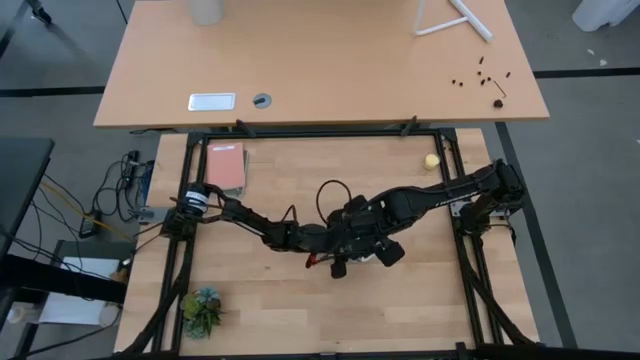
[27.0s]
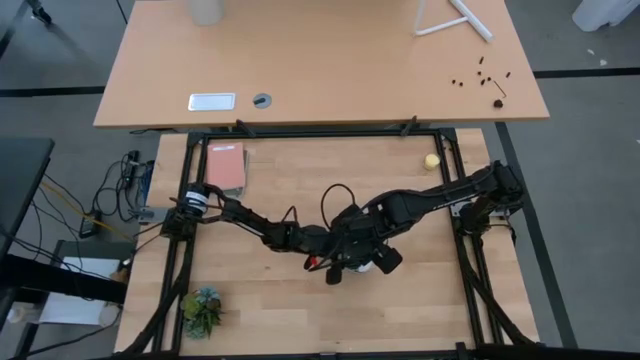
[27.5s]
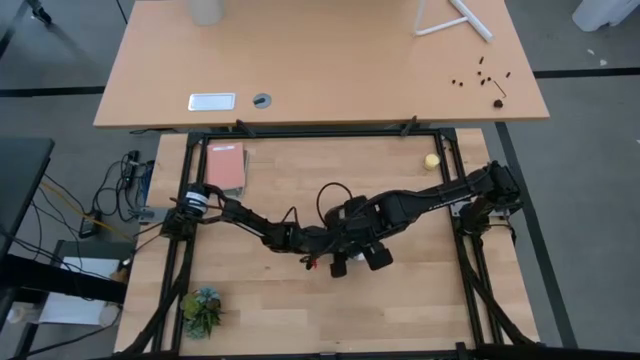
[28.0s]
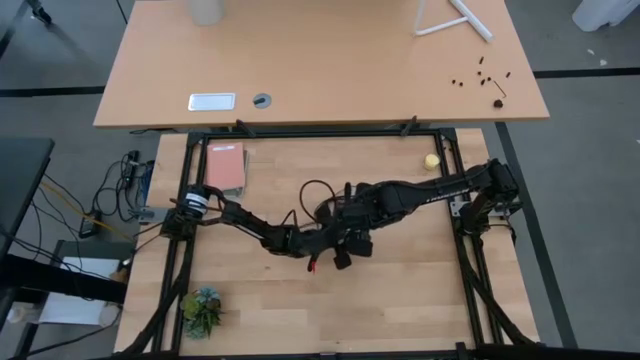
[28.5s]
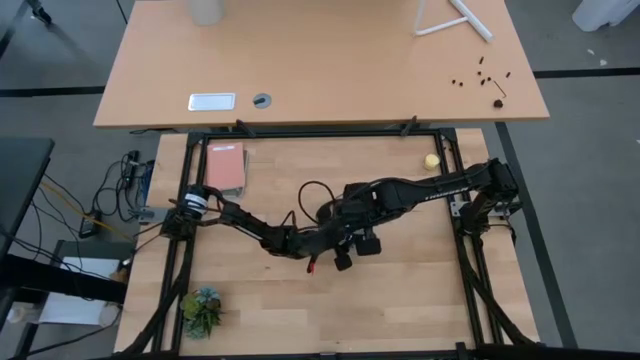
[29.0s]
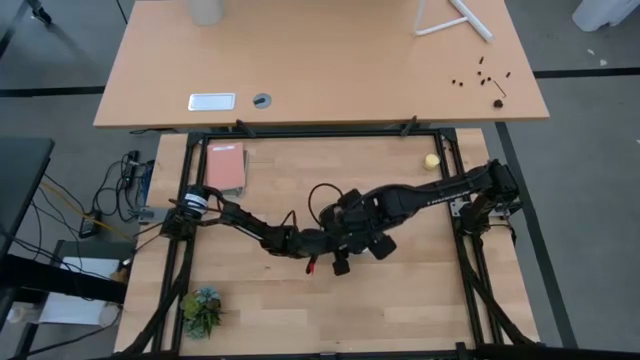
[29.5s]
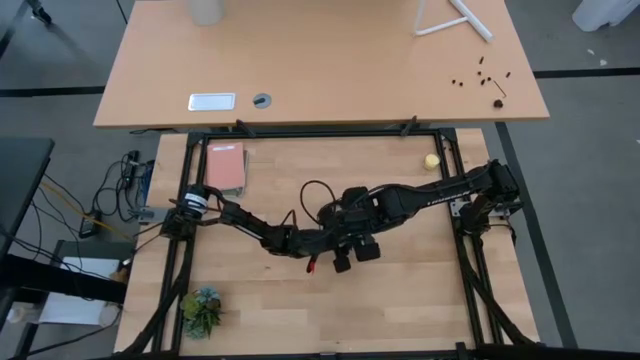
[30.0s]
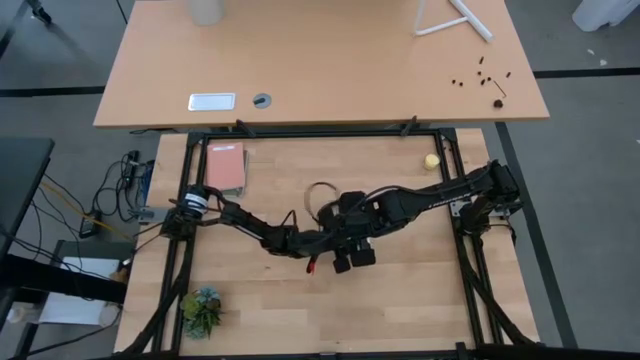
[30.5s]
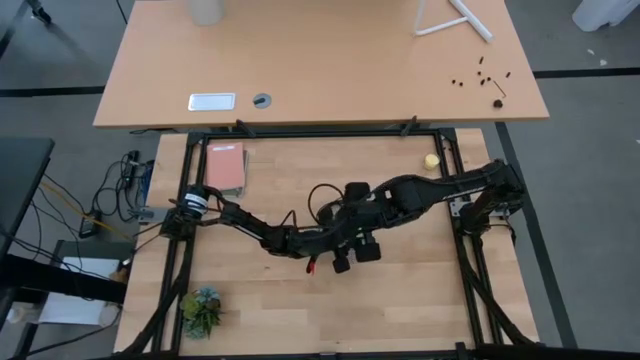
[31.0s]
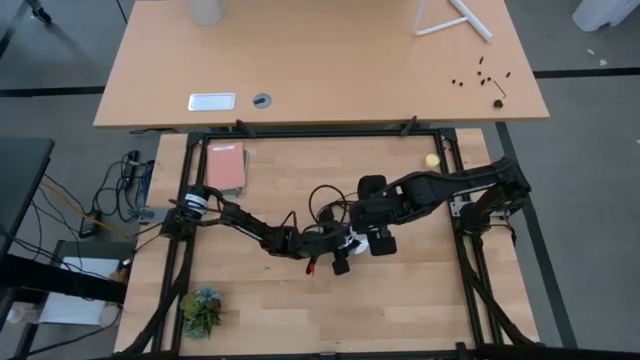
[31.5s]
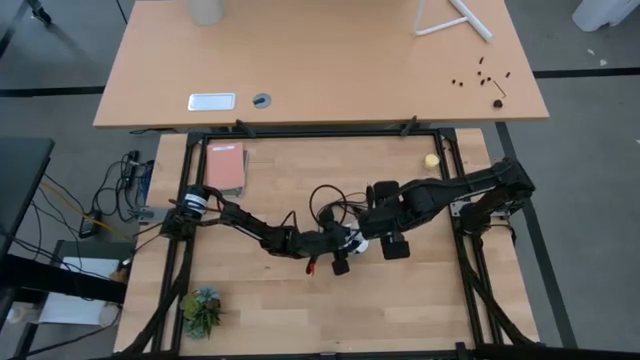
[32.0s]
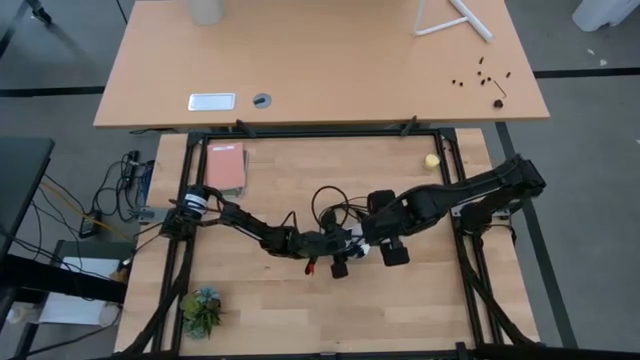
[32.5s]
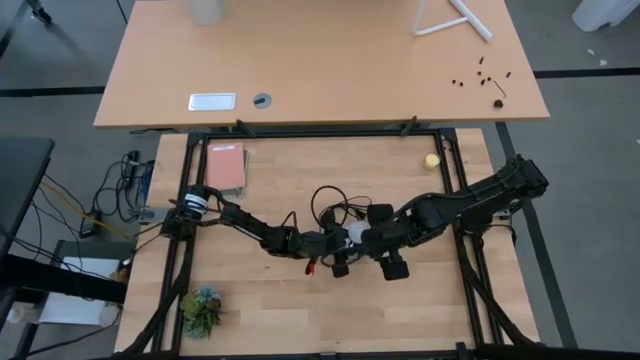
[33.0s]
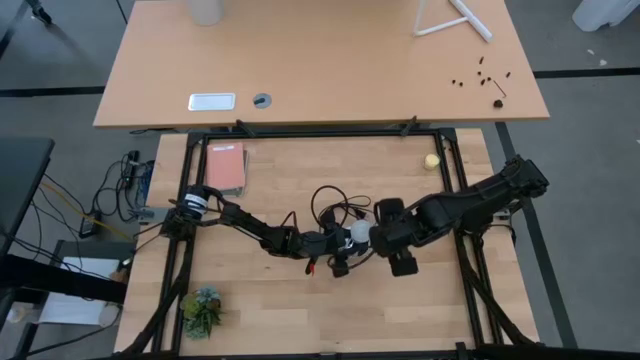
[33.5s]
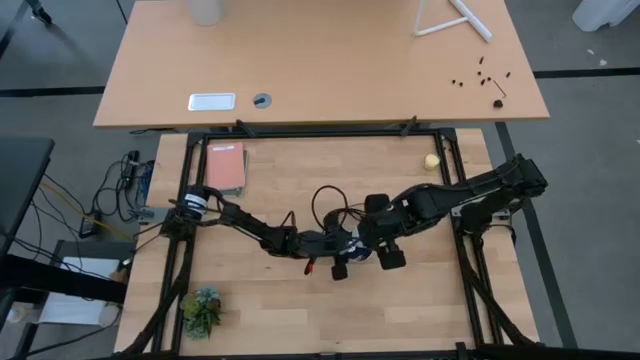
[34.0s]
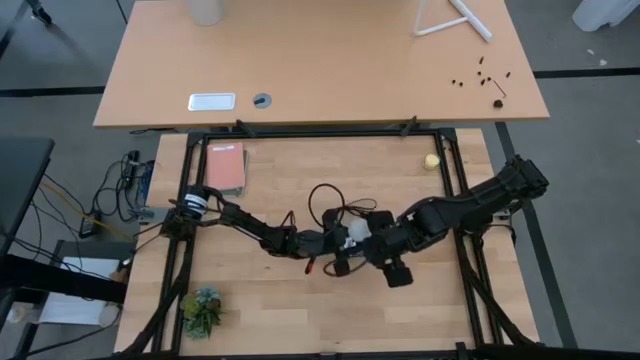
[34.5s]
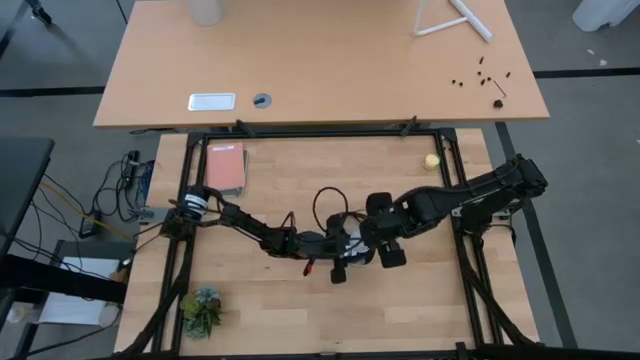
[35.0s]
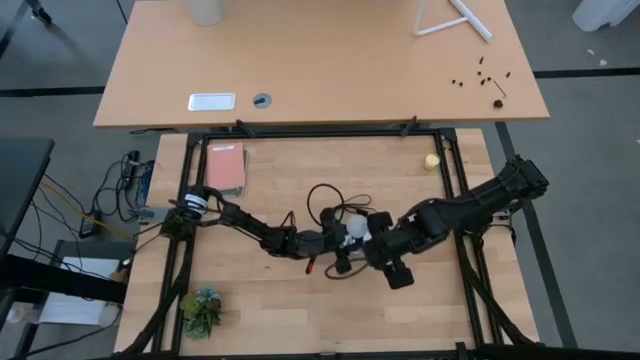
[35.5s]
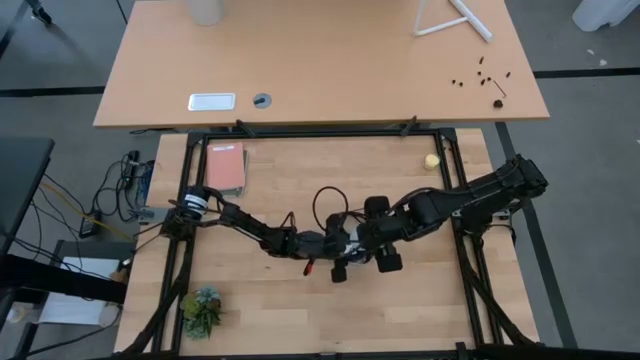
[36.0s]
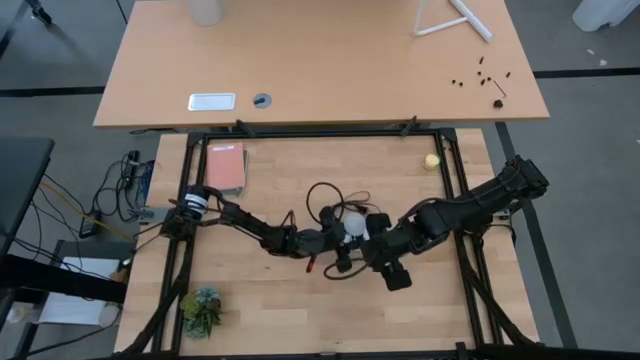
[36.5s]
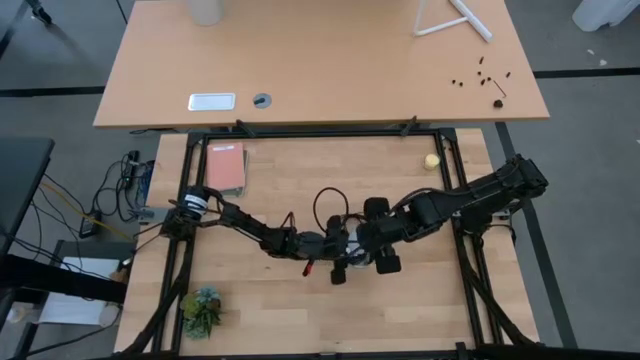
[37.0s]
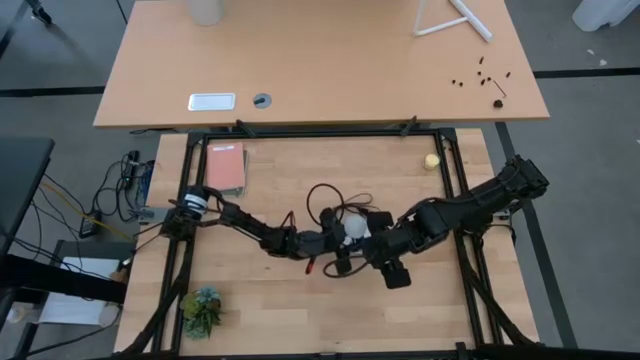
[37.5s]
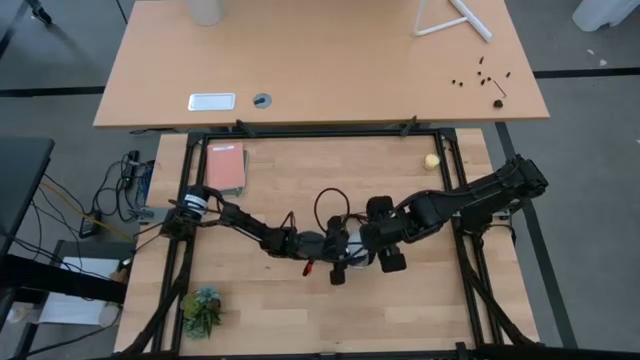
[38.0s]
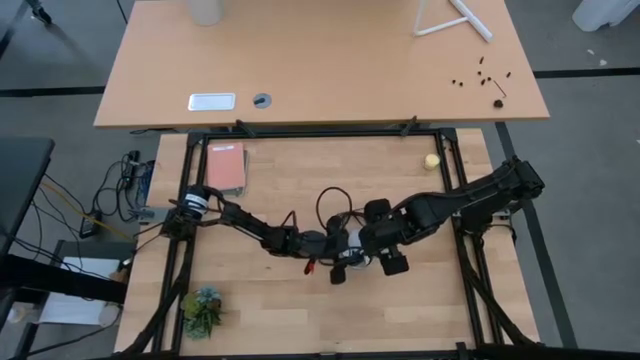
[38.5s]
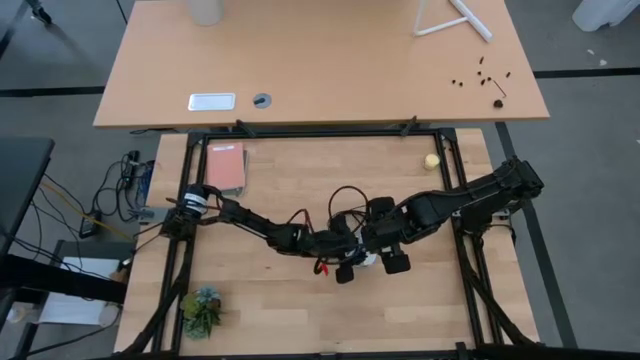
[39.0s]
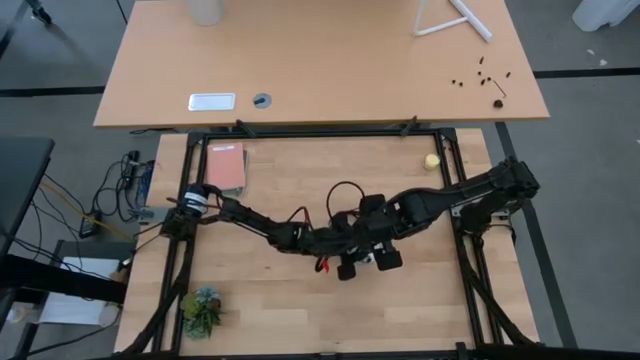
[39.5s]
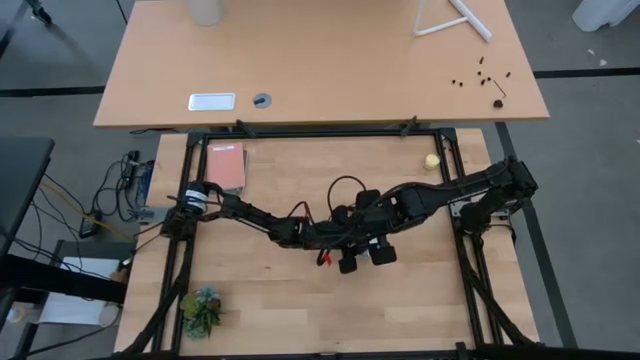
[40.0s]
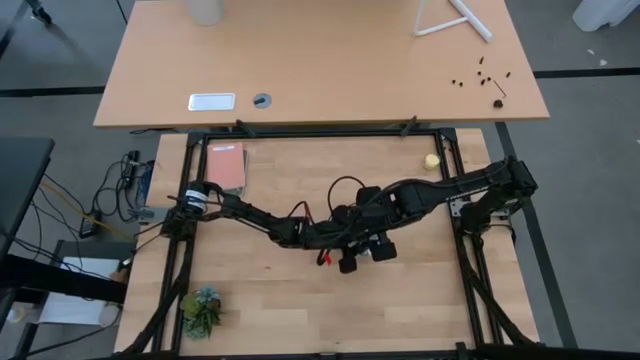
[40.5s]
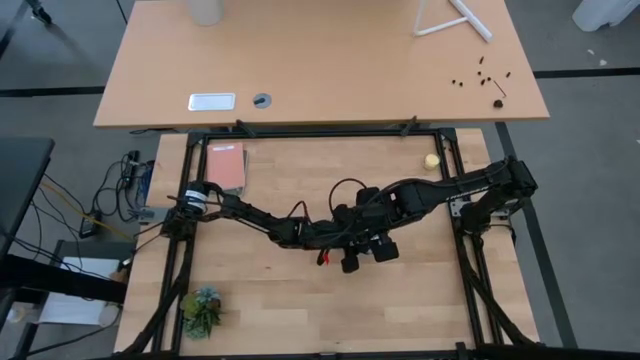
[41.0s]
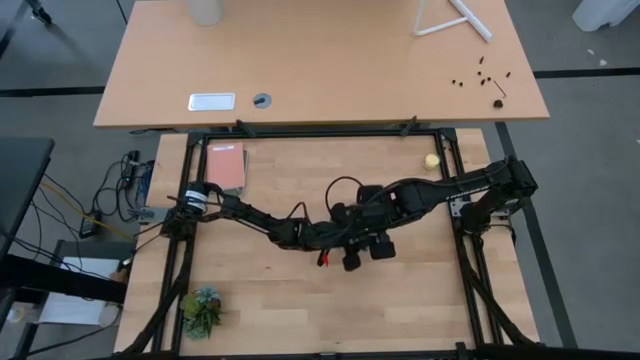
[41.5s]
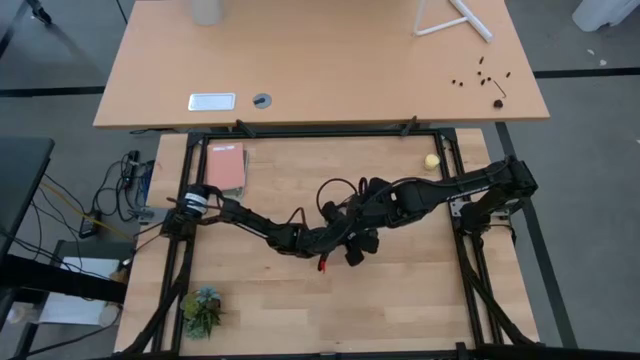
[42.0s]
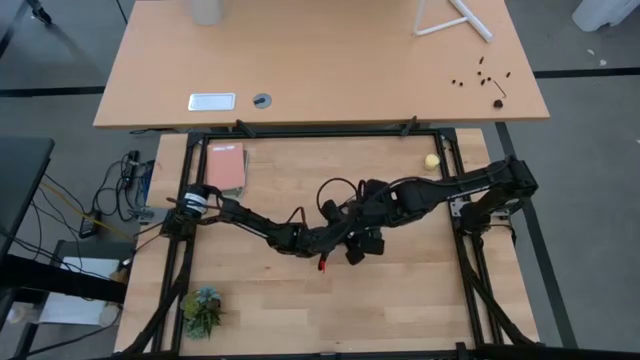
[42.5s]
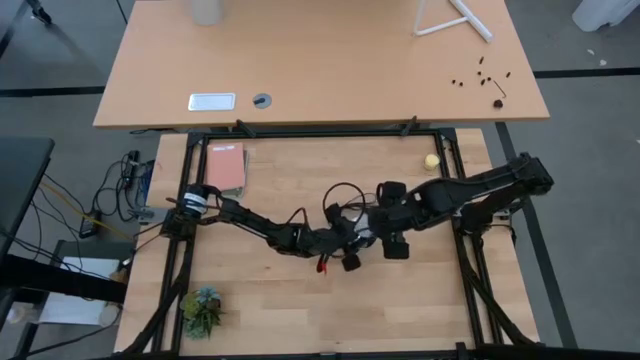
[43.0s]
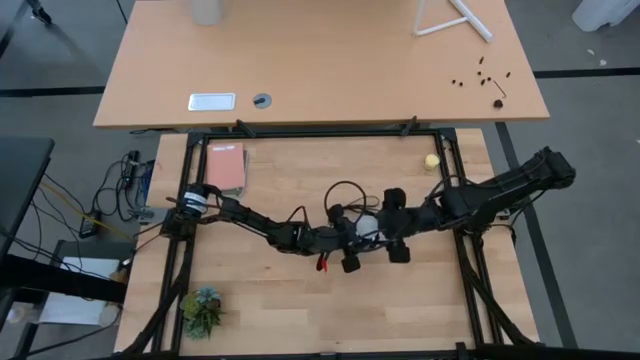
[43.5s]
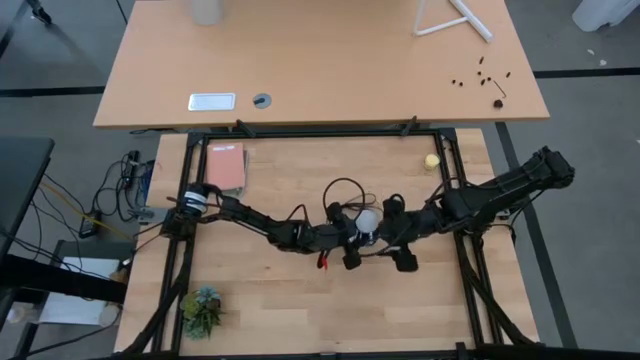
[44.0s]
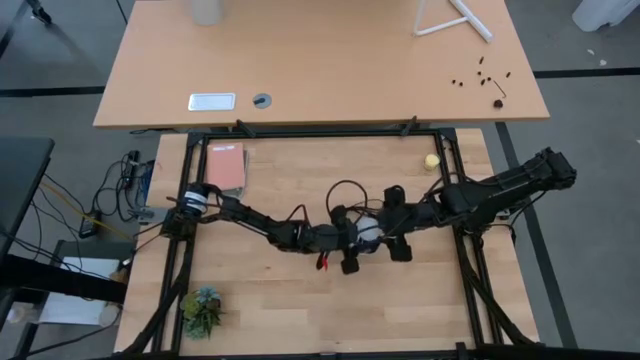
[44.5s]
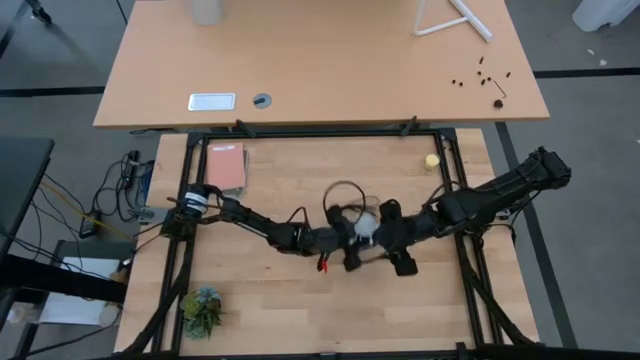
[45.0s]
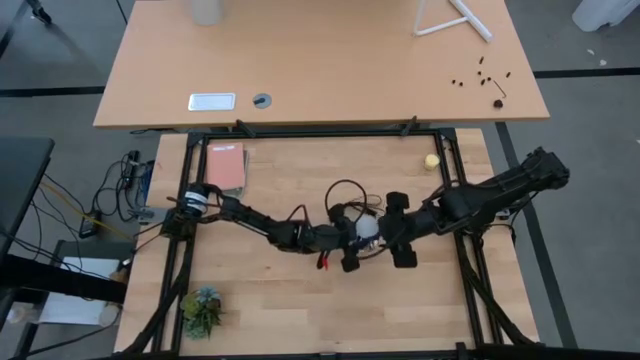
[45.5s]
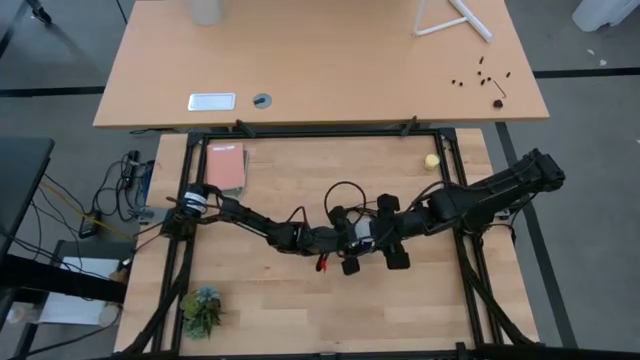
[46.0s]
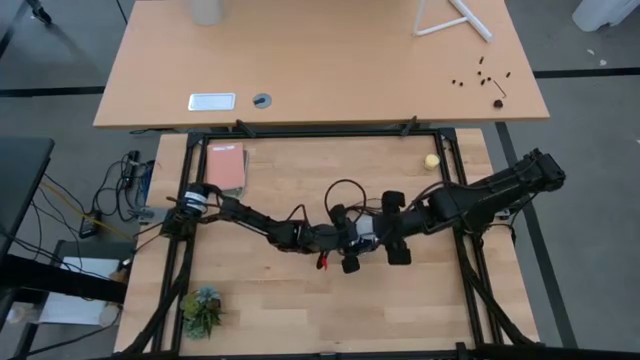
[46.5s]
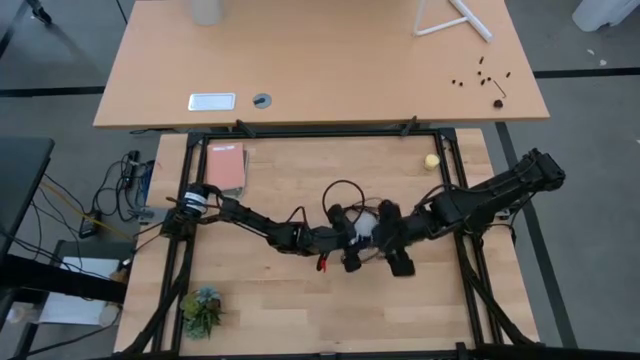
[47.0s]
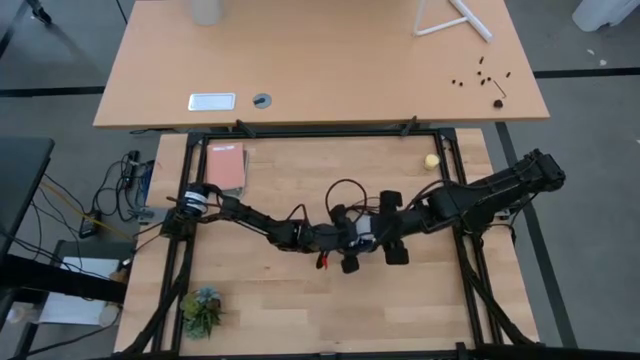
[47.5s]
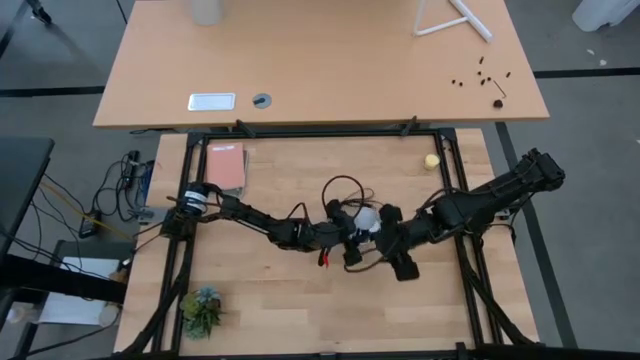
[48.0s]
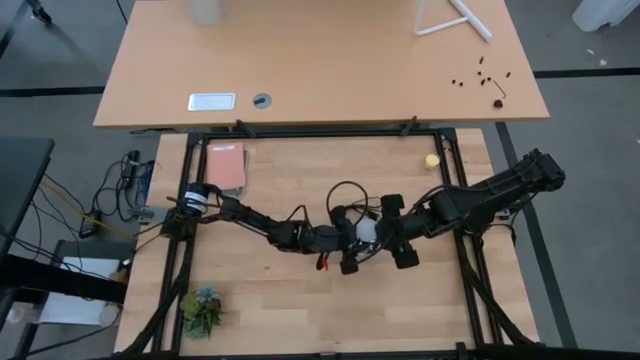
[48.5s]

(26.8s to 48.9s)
Task: Screw lightbulb
Insert the lightbulb into the lamp
